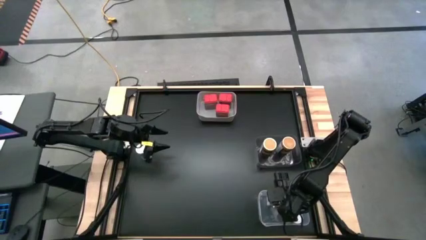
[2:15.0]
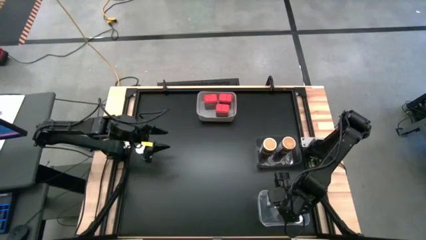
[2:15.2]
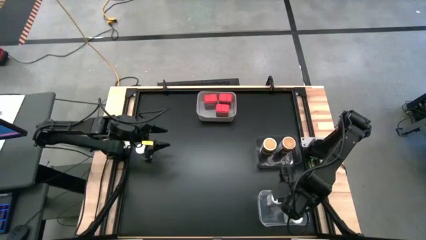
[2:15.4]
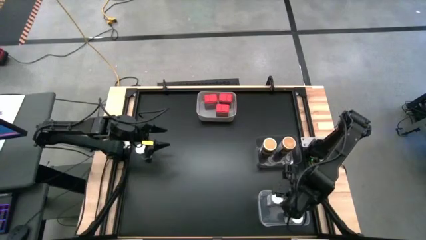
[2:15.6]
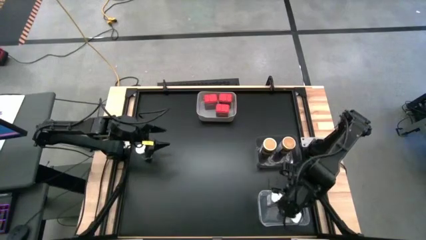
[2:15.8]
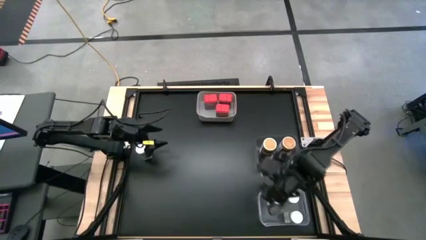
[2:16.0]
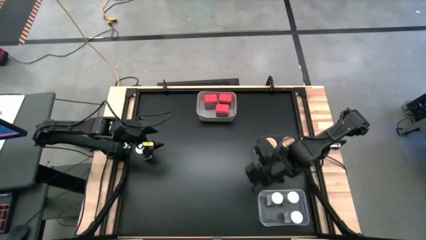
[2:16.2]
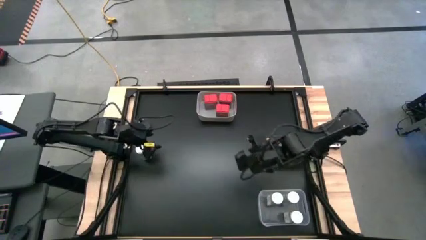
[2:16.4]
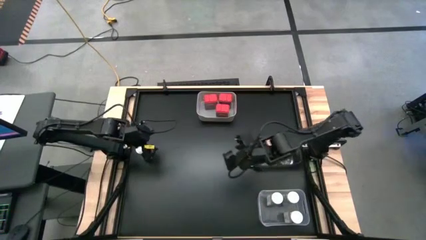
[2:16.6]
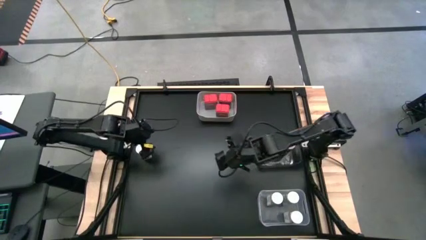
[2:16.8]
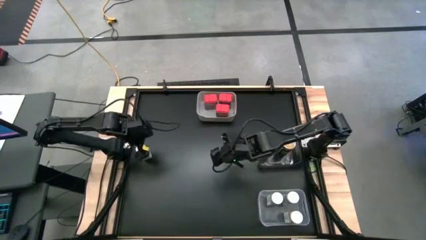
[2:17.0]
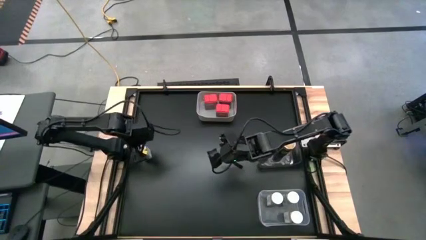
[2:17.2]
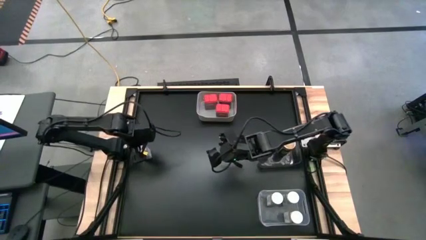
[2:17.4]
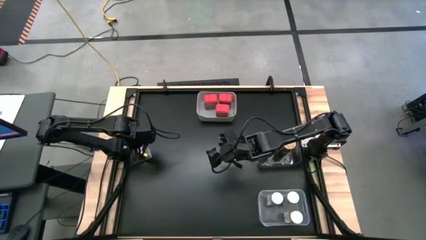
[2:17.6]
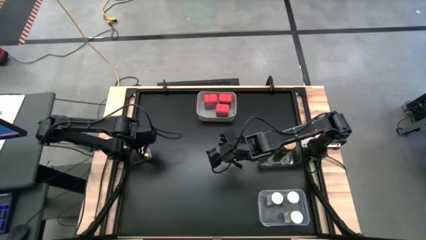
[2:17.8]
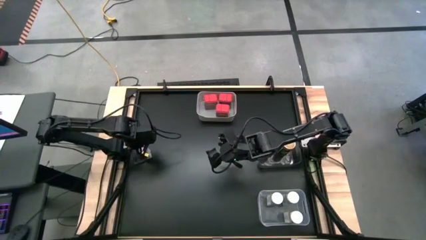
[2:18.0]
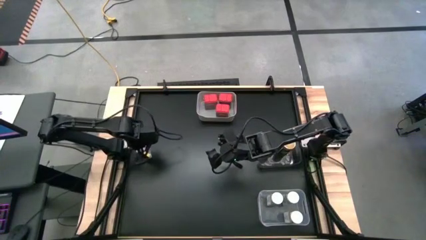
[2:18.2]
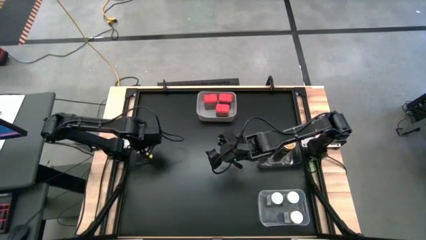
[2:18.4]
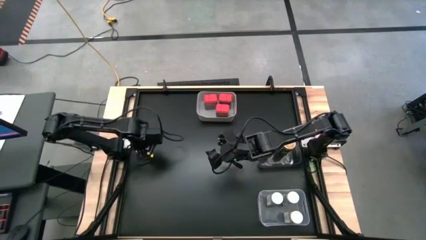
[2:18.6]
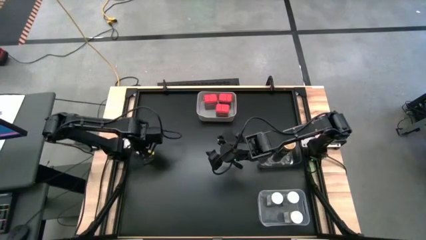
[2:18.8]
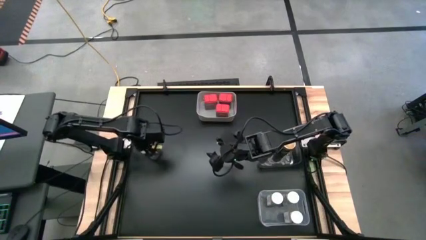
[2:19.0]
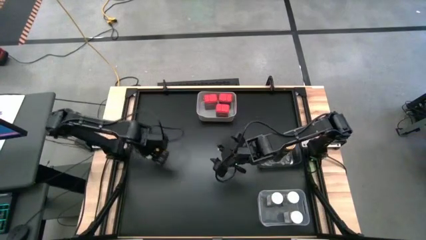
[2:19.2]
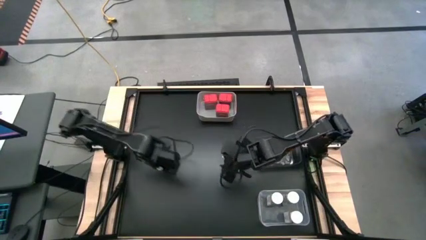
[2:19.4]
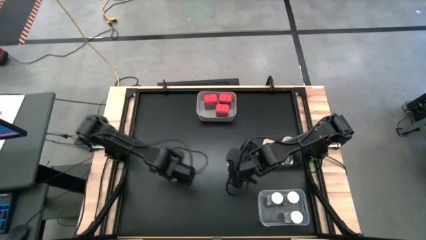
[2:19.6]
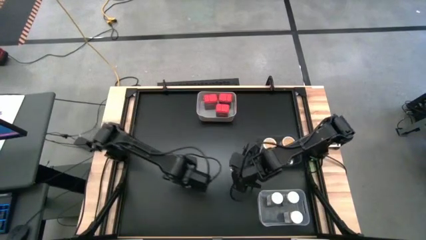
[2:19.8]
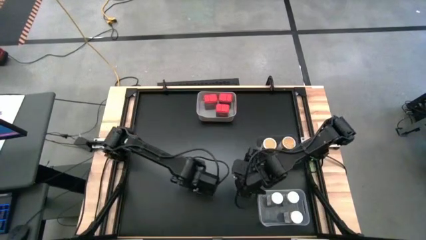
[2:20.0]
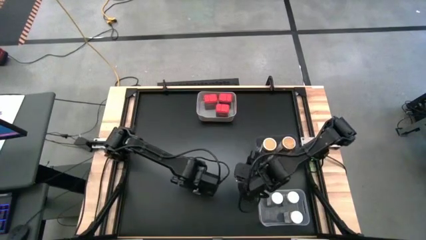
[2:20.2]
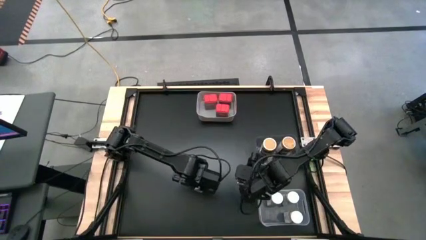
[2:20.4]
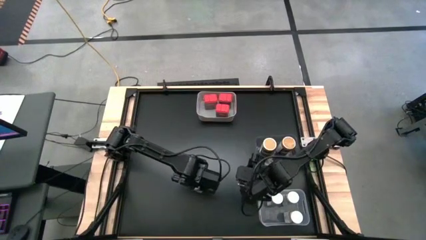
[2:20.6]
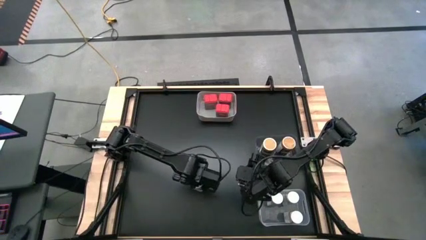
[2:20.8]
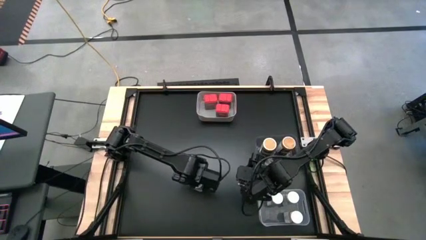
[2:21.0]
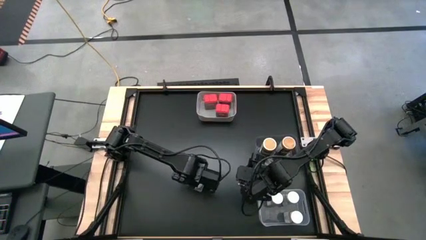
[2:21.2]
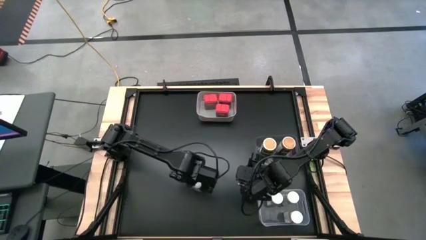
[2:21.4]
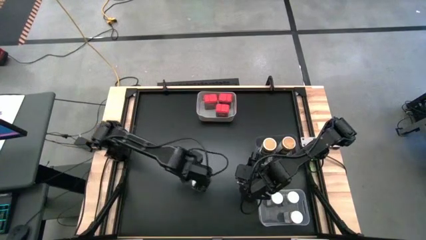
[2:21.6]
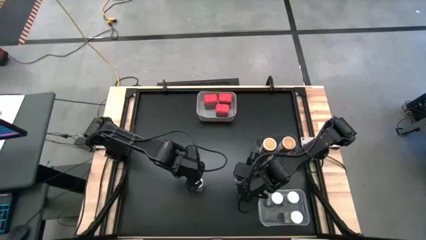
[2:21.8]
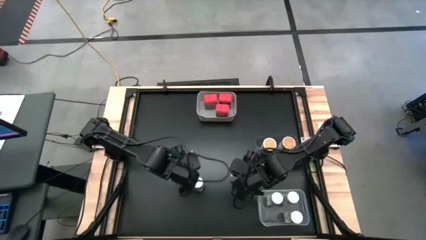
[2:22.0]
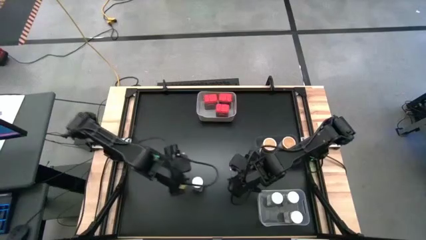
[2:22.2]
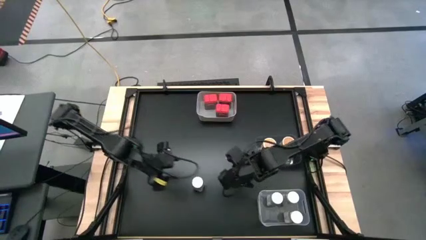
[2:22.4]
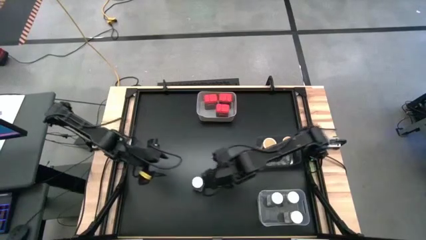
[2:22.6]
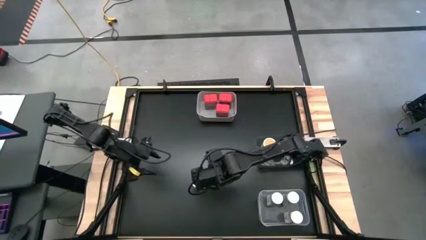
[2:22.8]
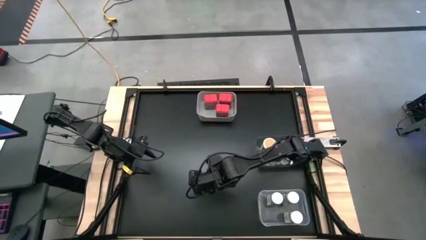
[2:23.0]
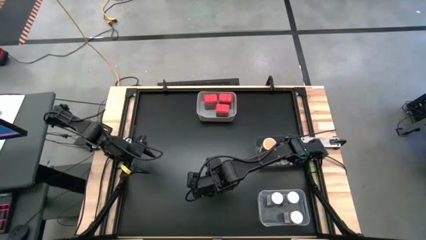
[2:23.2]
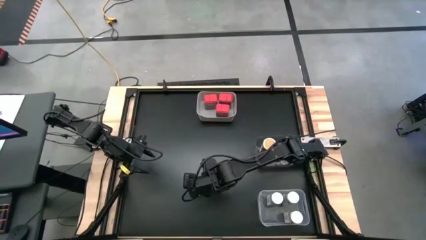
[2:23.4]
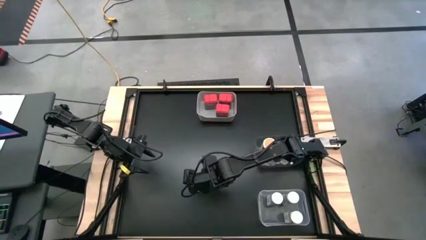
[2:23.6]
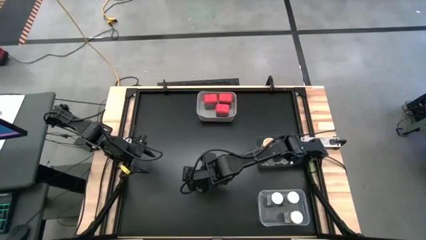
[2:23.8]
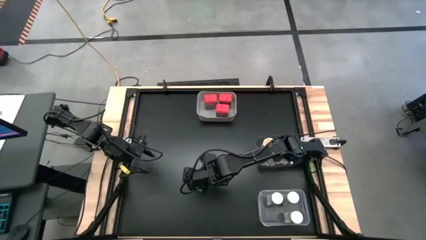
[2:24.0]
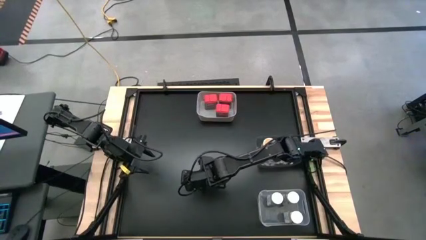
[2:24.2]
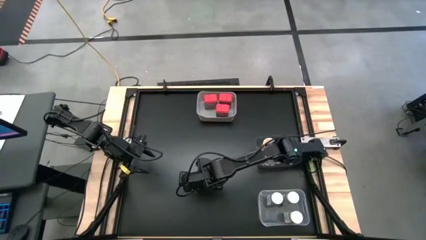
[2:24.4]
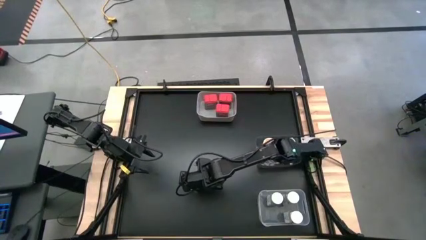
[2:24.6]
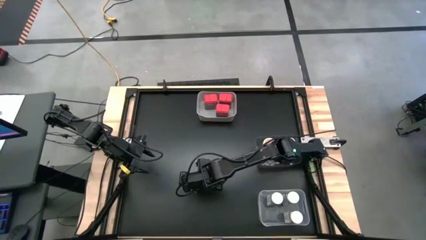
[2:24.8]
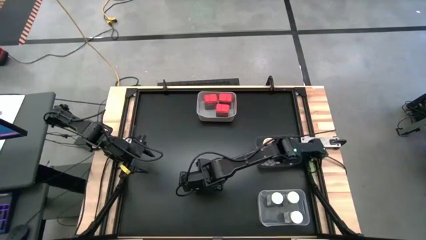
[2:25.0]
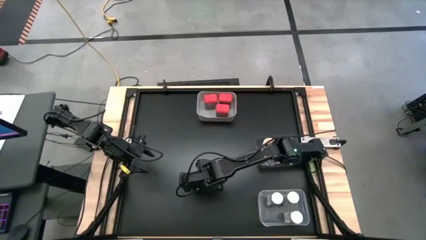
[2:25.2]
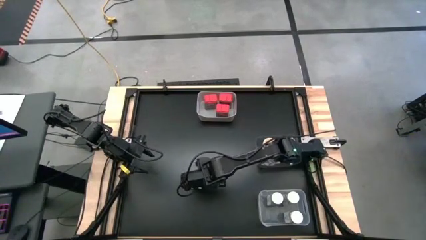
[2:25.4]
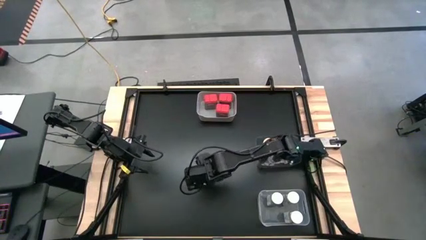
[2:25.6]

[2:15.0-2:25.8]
Task: Sort spices by type
Put the white seasoning bottle into the transparent bin

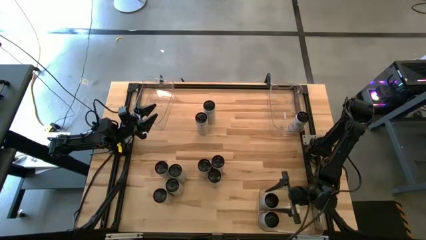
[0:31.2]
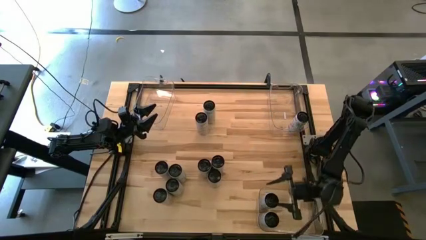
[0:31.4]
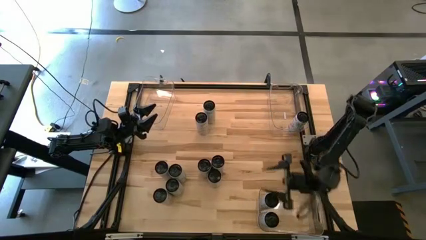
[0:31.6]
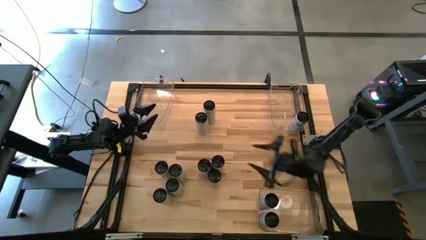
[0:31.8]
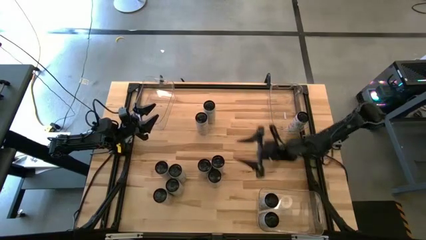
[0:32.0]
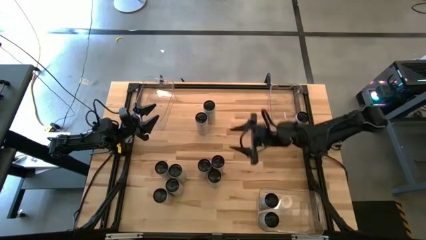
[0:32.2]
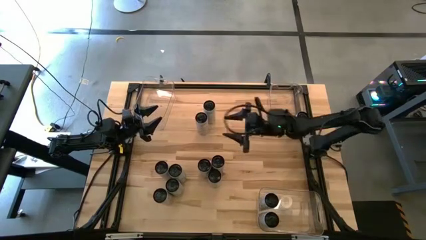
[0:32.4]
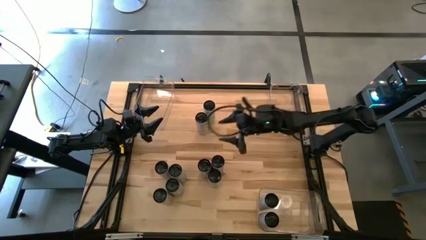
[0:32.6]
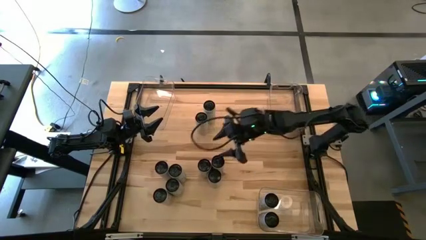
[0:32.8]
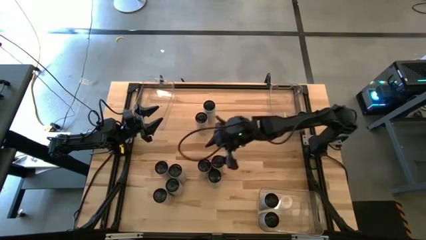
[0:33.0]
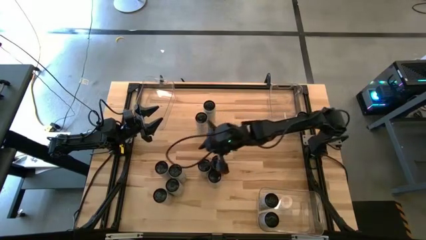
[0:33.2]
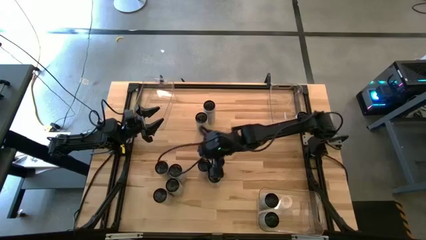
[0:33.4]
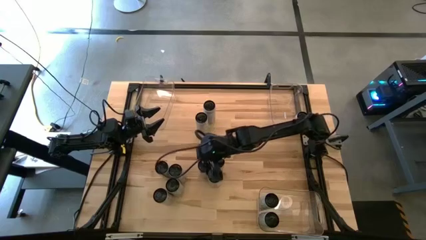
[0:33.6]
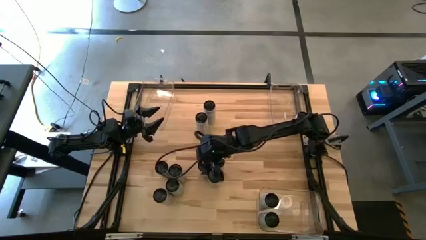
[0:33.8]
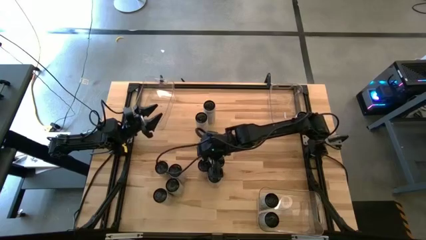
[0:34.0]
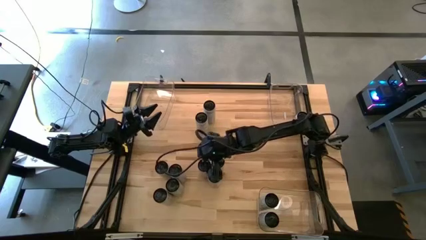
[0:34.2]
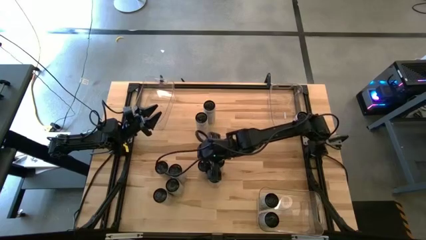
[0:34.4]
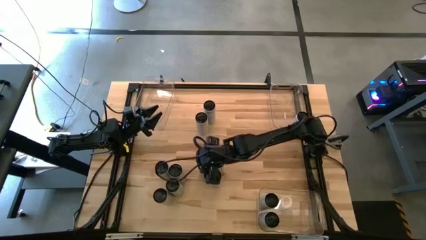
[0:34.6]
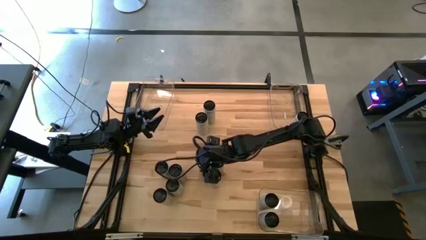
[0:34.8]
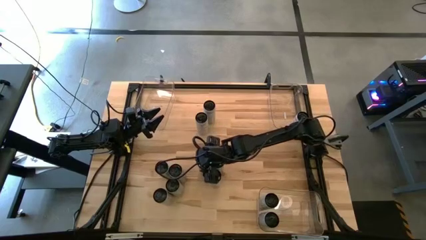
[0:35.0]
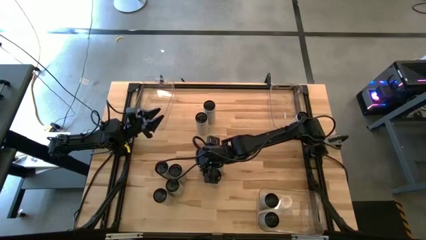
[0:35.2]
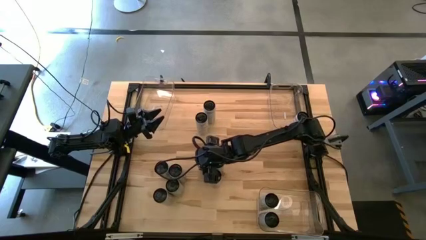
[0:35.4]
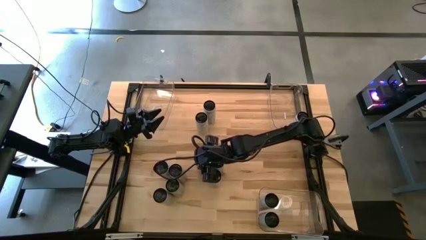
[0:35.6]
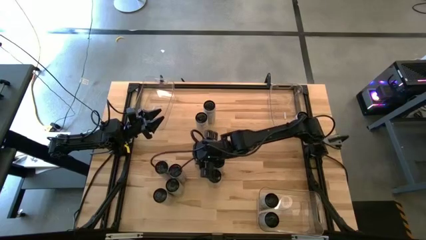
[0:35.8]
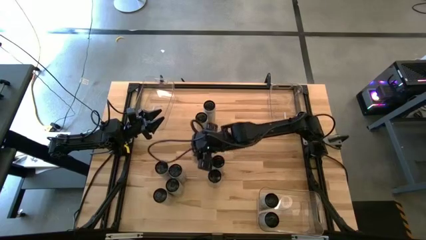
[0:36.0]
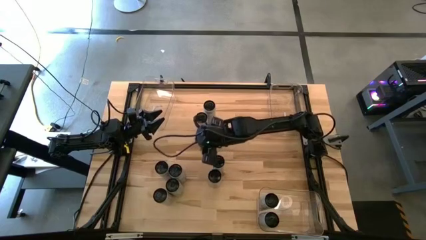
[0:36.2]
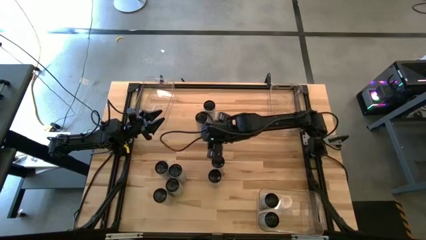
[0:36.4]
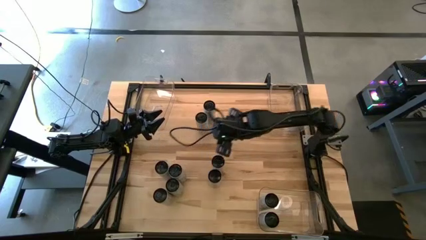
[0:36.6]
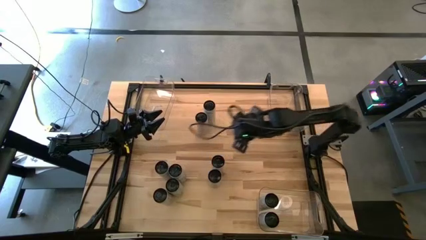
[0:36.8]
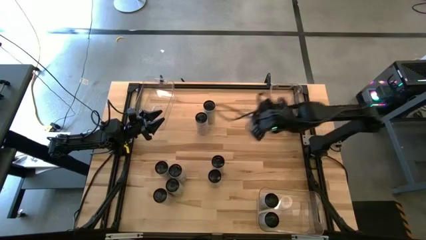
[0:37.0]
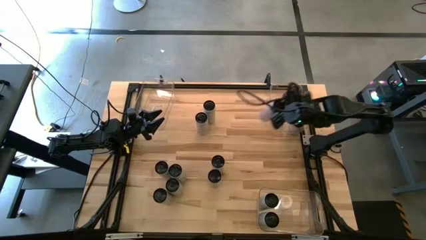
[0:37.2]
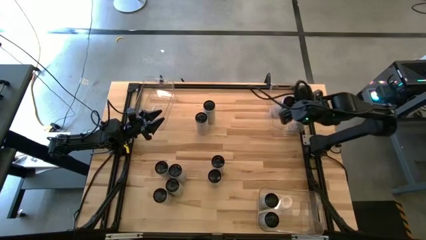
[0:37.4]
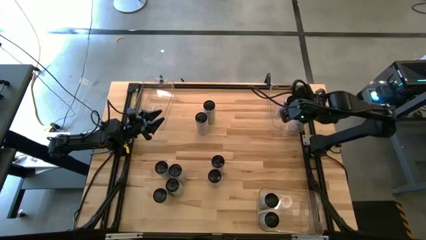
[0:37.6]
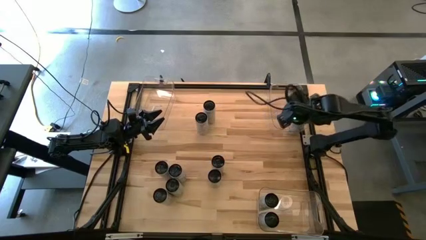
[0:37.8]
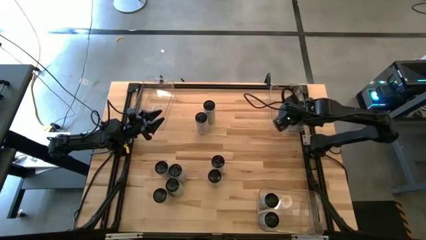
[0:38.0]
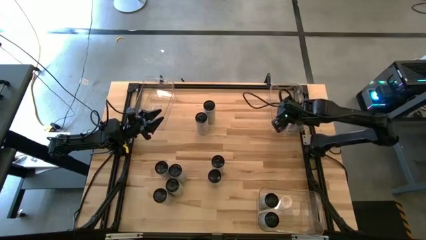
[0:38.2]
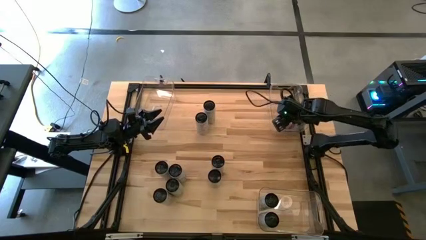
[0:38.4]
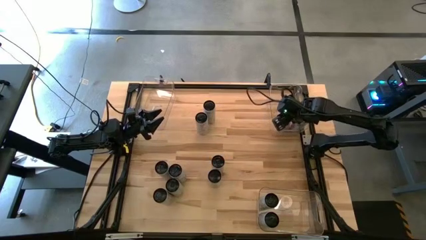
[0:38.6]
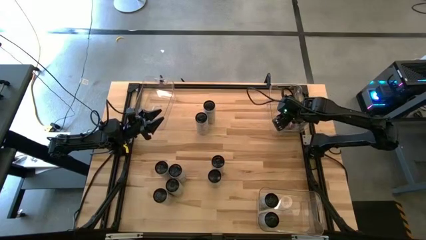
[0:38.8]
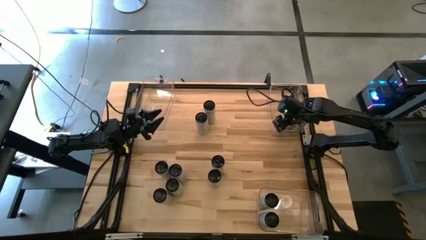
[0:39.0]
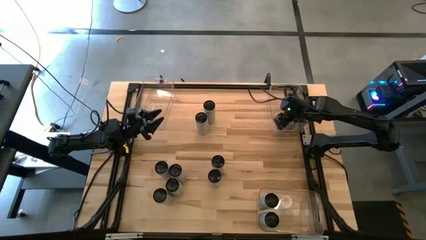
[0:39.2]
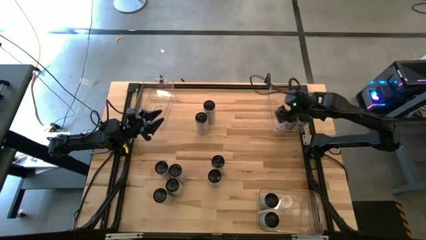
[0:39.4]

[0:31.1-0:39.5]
Task: Sort soda cans
Put the white/pink soda can into the top right transparent bin
